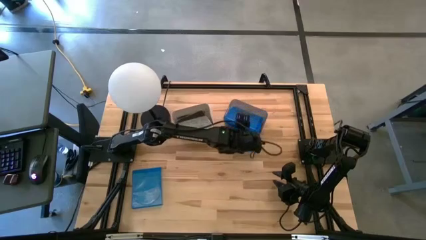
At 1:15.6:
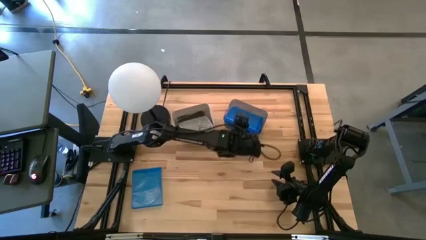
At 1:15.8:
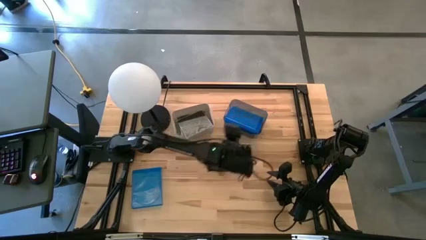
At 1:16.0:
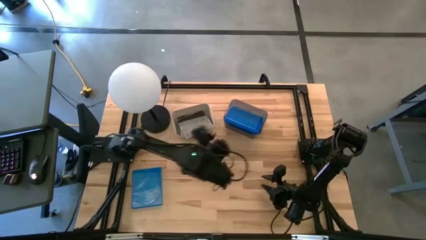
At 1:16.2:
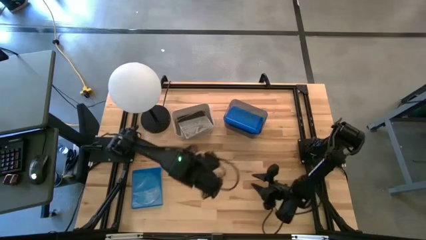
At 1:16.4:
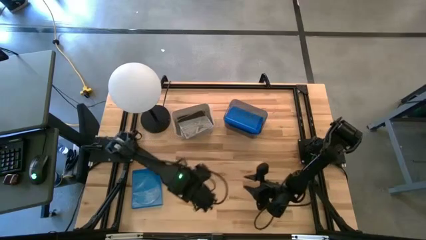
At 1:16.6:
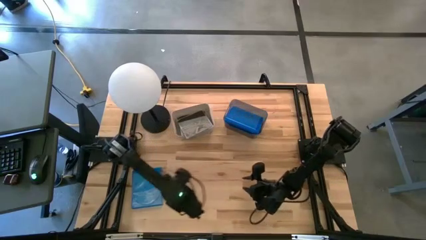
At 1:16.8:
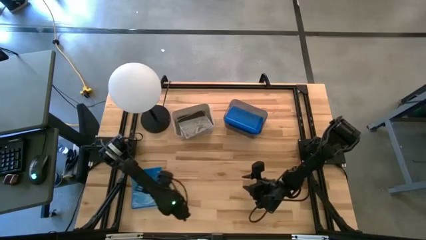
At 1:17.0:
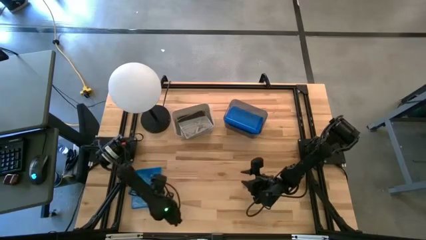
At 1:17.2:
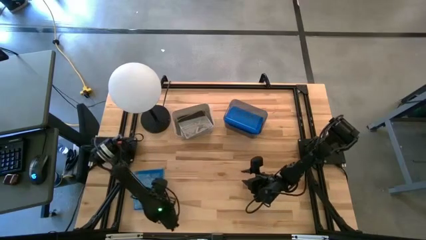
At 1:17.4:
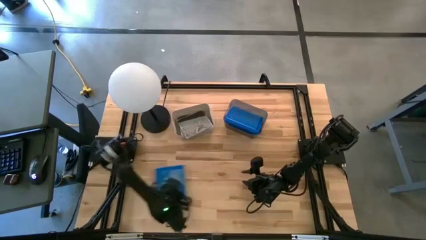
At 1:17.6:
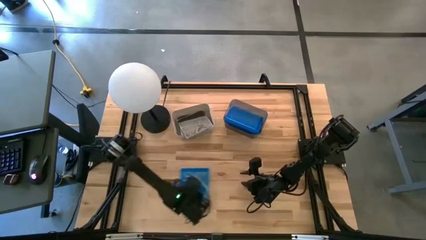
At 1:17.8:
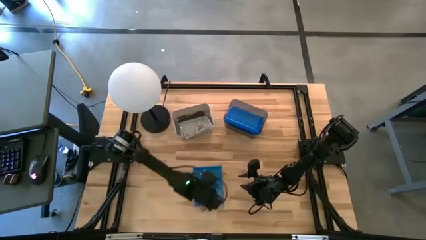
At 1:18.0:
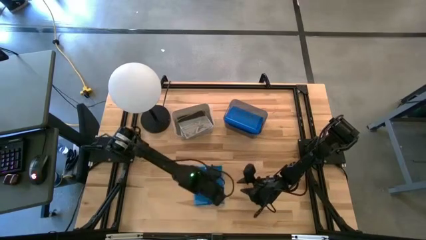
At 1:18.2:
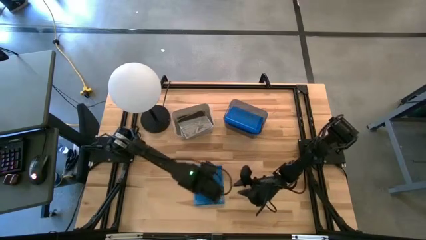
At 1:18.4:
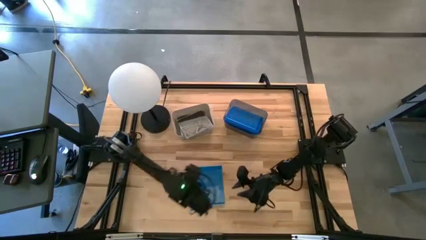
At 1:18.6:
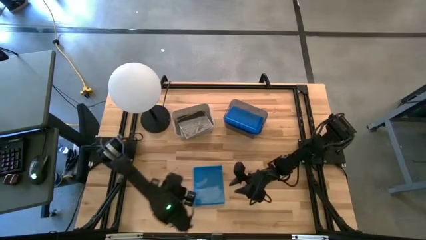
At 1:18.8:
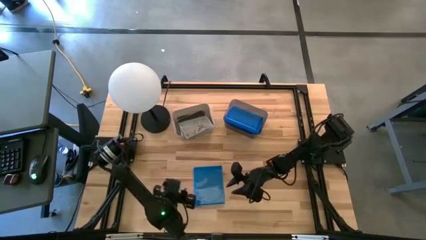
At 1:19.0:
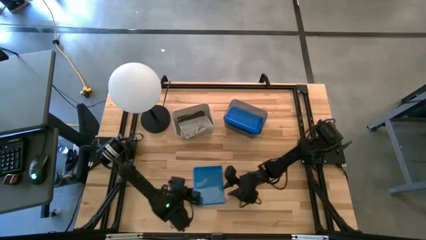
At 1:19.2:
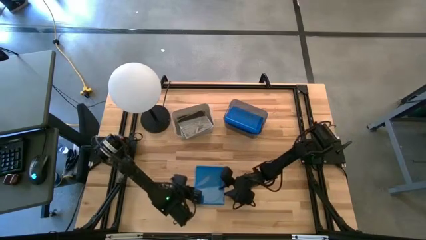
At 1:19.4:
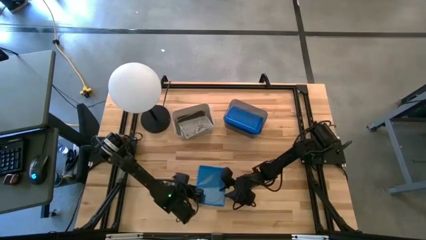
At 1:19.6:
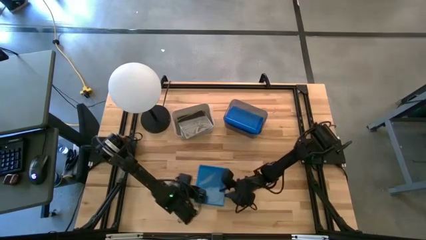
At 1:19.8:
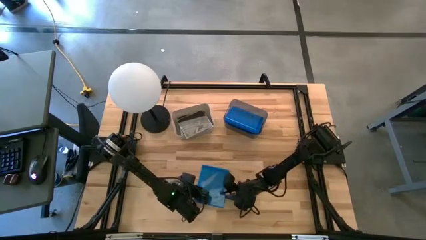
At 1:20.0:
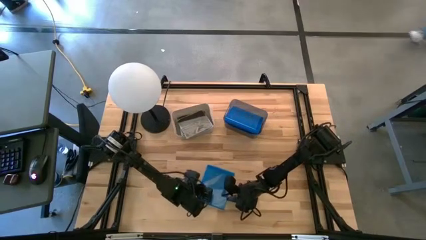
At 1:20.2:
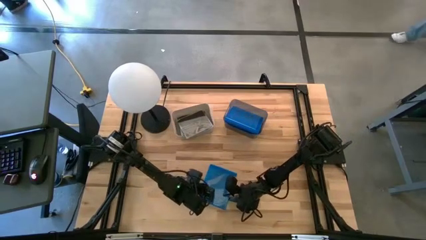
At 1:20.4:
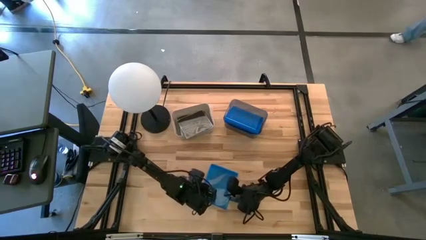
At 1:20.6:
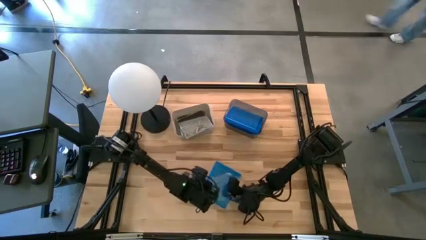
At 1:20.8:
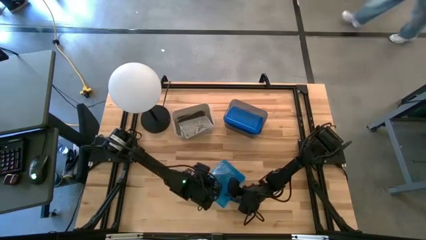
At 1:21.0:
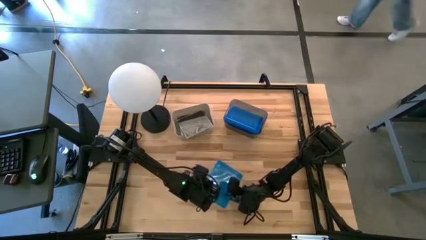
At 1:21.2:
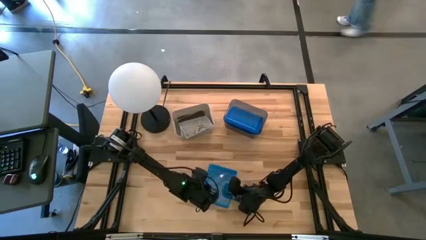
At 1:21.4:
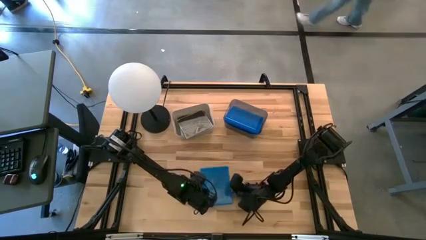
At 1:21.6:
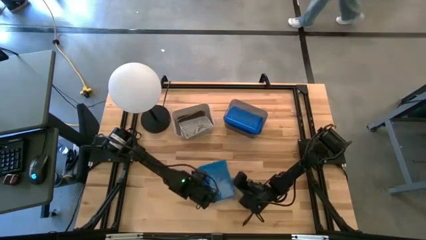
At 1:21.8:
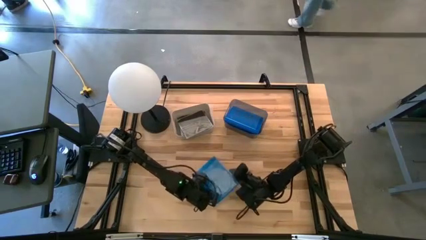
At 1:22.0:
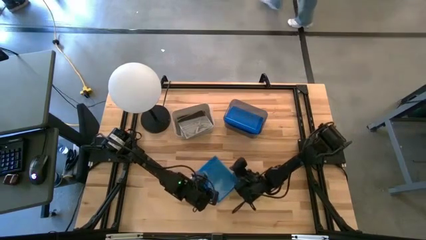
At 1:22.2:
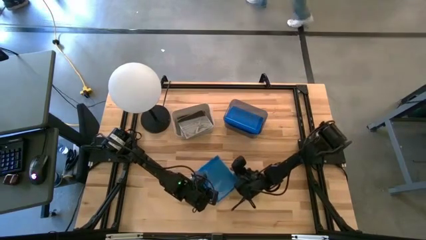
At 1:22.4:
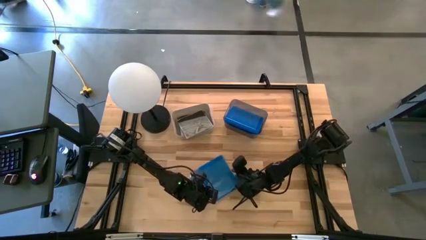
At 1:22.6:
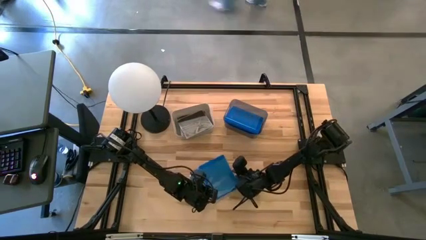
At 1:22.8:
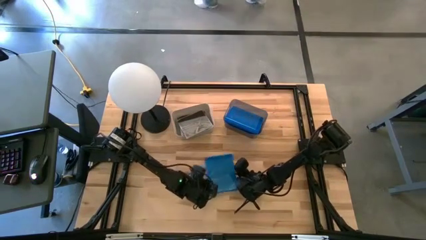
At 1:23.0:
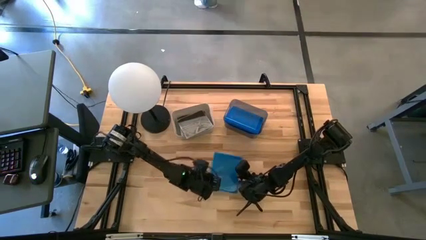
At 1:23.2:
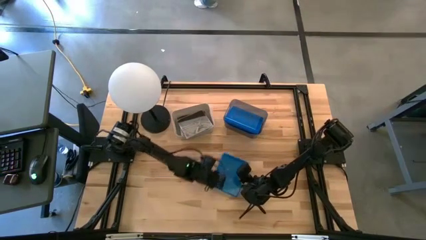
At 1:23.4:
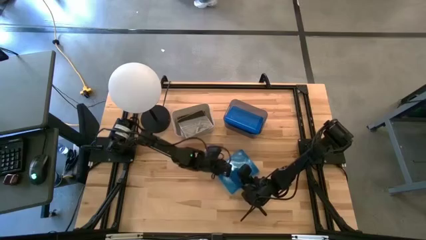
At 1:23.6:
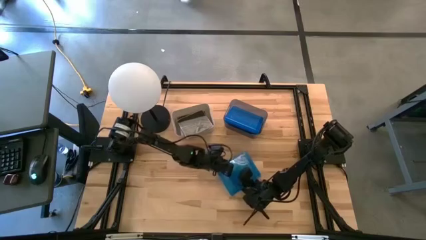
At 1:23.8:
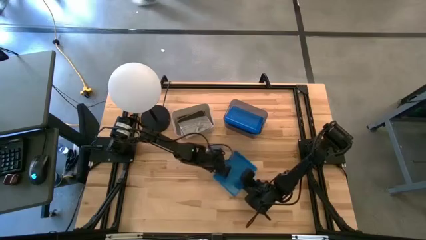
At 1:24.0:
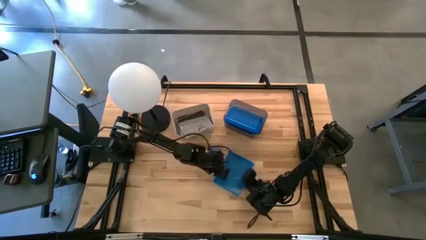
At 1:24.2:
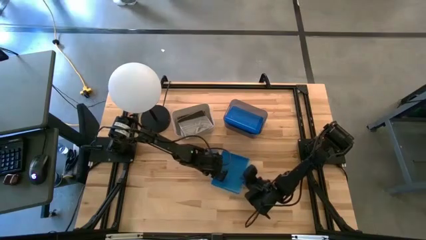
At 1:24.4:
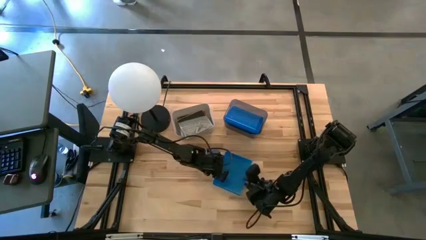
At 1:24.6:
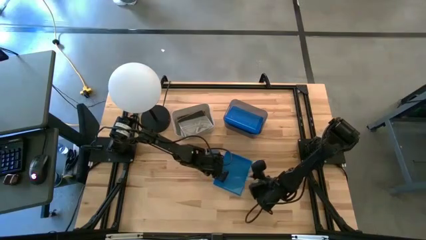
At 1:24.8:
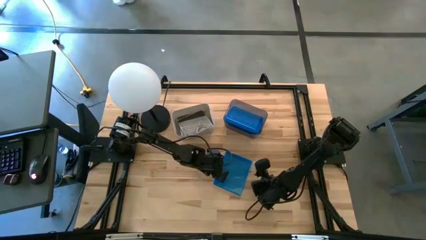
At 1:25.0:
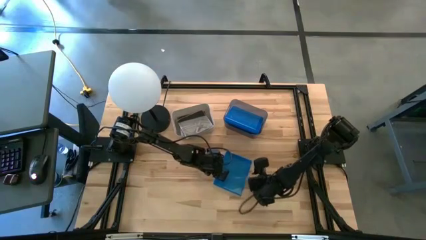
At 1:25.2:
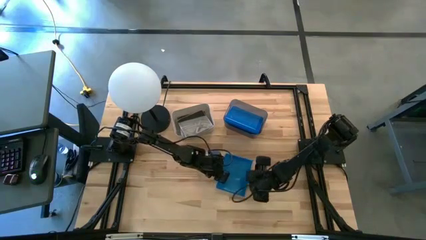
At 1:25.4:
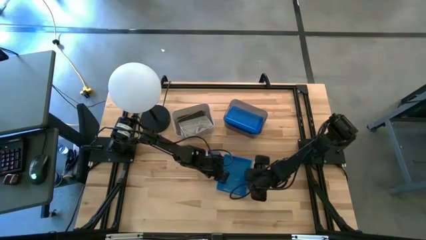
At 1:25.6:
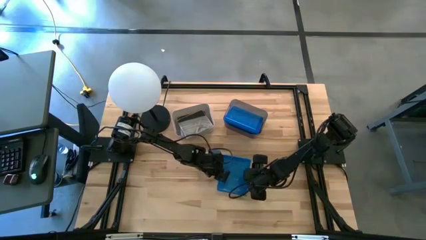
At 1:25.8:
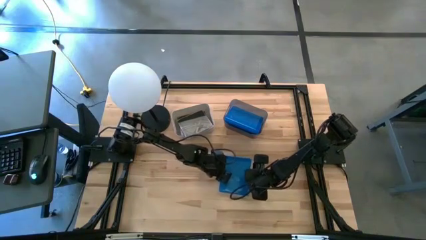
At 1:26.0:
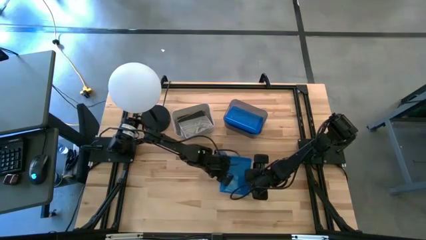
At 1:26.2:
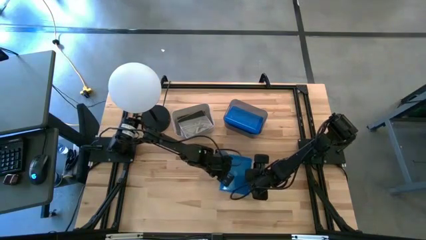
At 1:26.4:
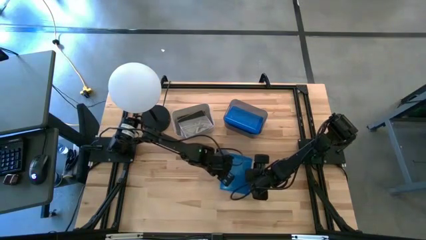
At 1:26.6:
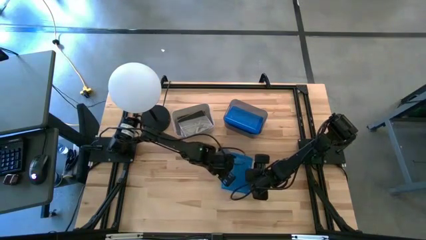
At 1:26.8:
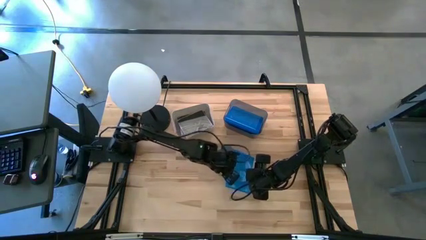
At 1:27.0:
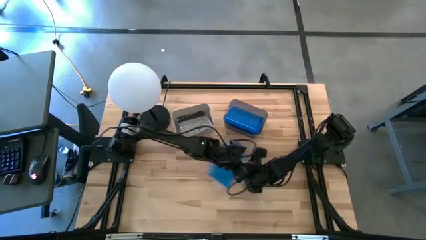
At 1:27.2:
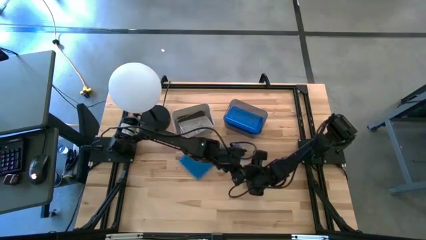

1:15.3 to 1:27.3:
Task: Pick & place jewel cases by type
Put the blue CD case into the black bin

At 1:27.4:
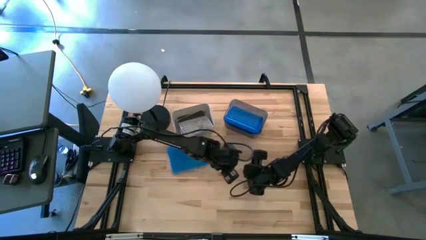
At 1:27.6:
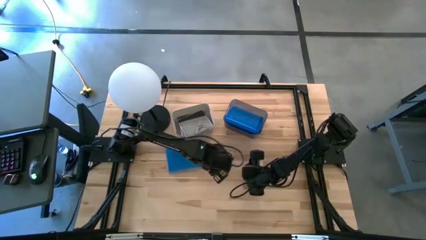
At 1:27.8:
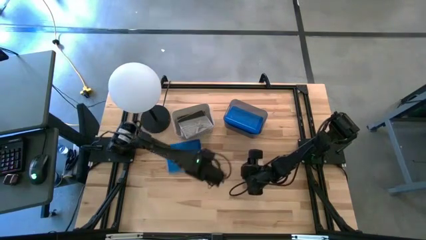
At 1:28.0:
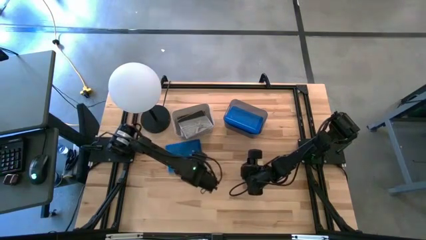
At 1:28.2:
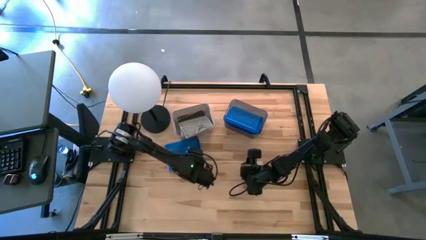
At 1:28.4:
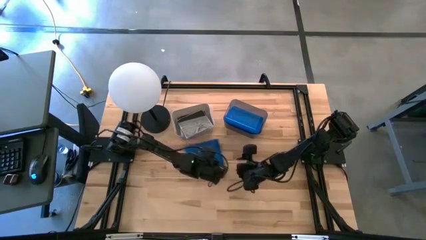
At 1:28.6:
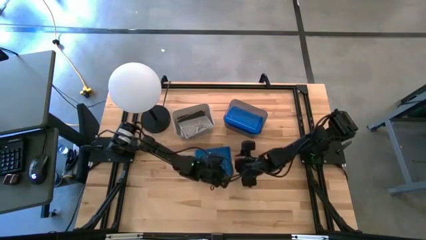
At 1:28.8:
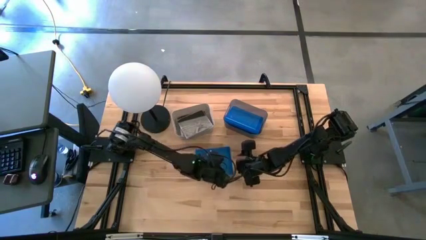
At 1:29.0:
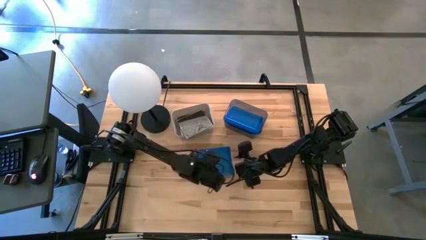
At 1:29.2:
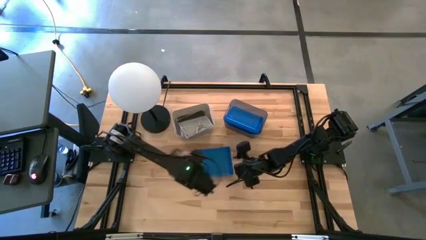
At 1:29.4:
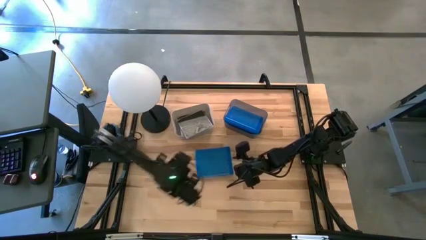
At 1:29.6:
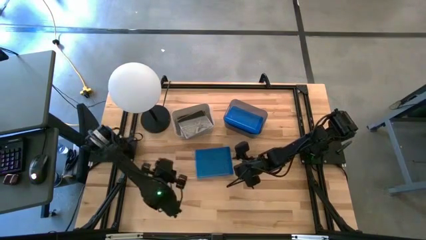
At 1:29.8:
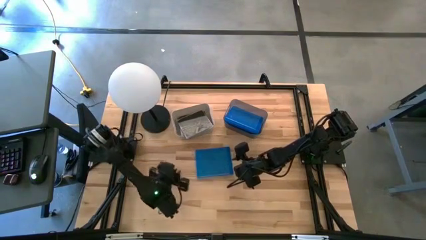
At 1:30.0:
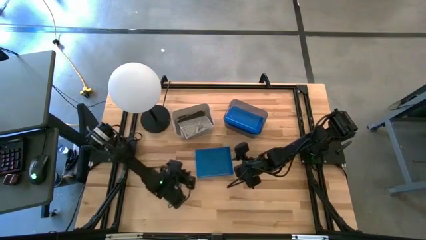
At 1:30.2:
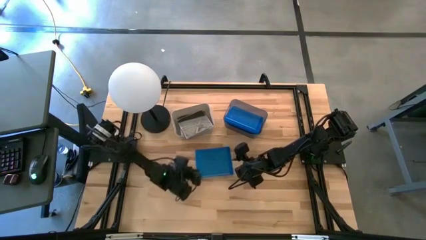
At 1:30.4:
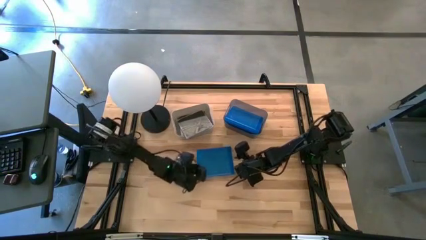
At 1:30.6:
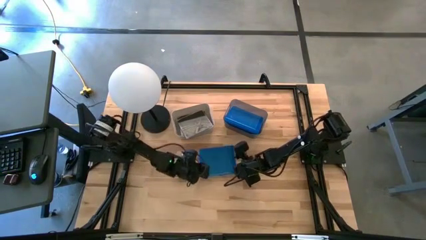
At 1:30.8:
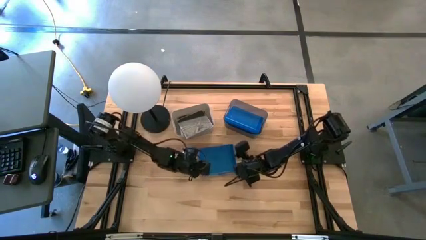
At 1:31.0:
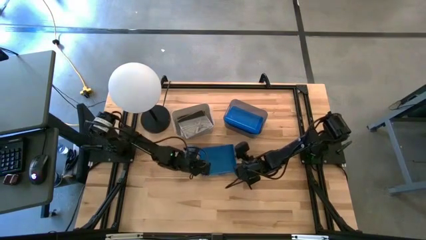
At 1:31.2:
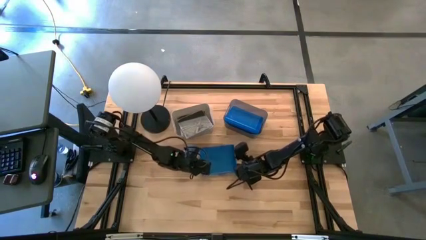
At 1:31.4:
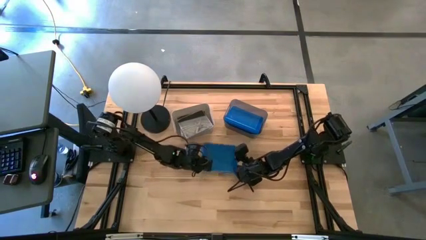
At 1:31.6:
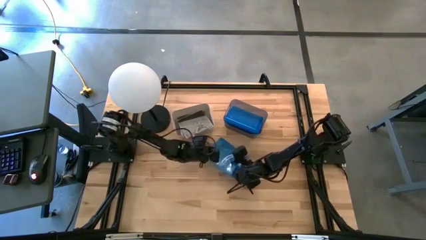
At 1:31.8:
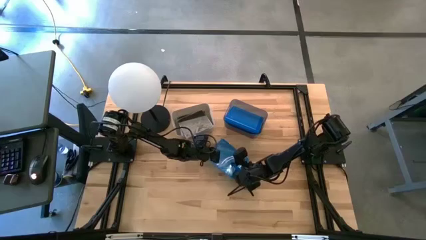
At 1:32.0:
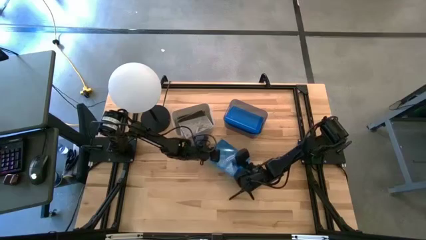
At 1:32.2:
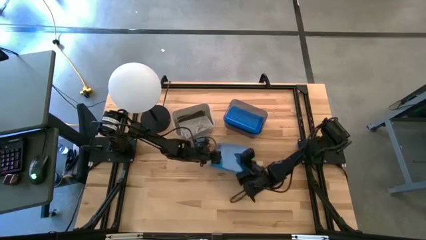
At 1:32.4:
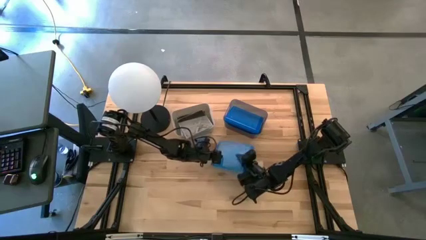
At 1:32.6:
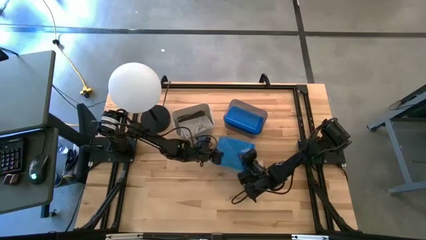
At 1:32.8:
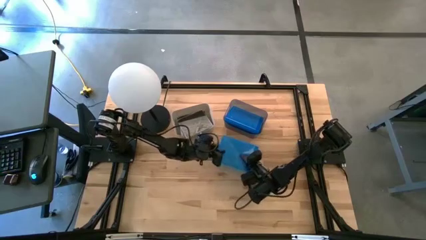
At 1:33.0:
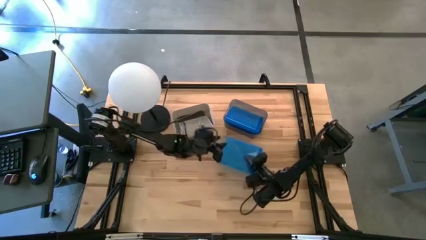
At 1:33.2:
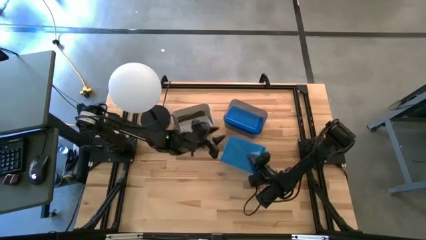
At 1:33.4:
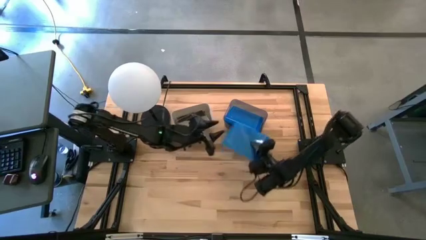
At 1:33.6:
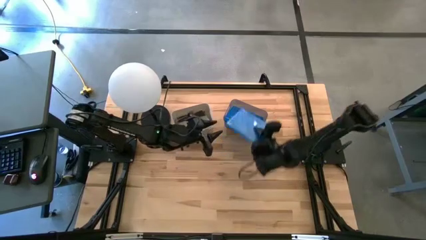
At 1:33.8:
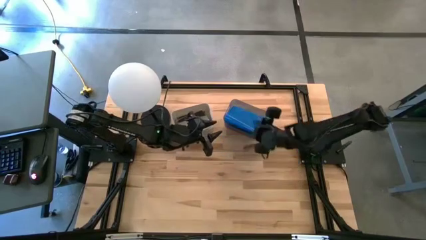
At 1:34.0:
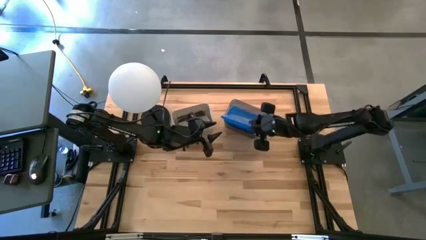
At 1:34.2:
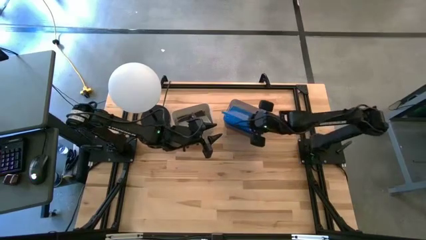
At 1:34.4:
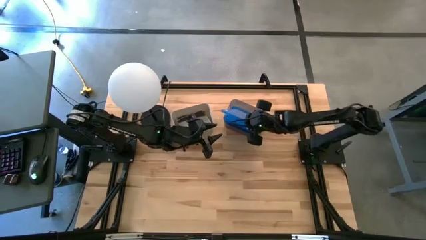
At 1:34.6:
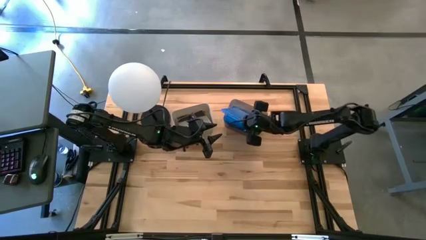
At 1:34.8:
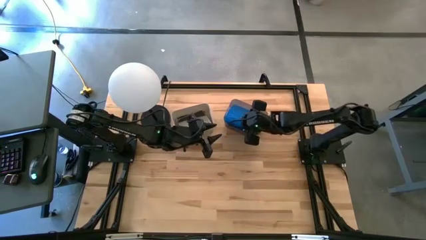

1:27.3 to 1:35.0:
Put the blue CD case into the black bin
